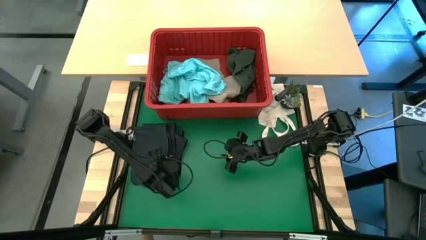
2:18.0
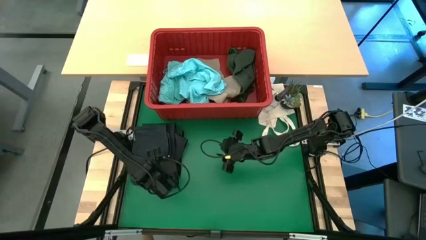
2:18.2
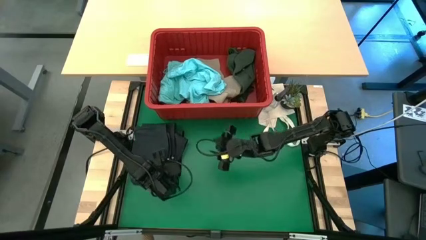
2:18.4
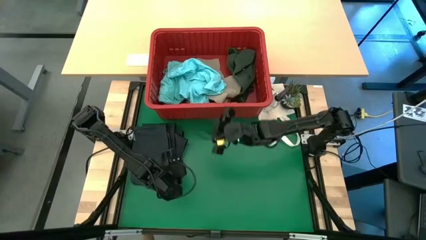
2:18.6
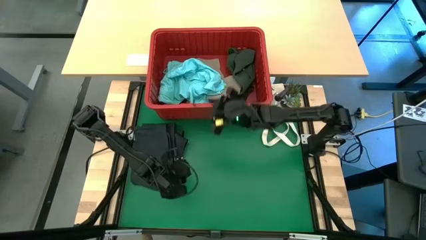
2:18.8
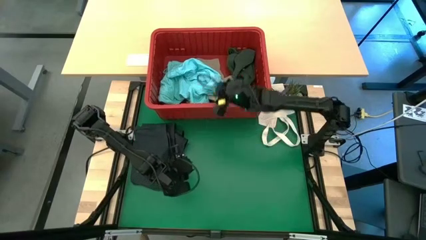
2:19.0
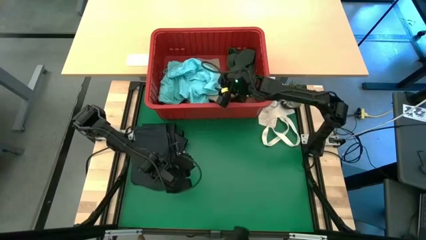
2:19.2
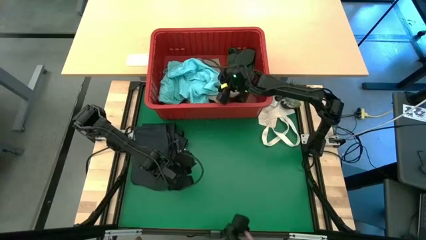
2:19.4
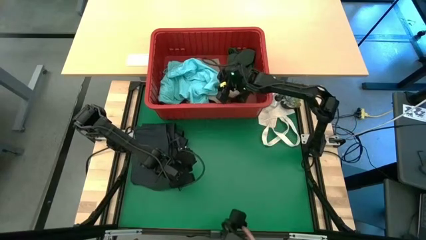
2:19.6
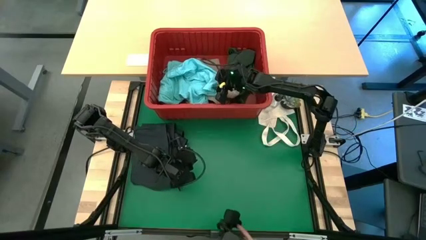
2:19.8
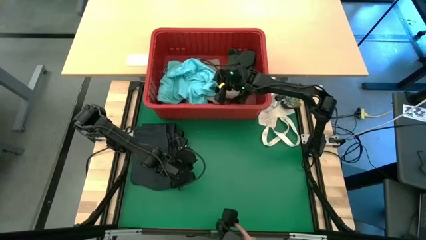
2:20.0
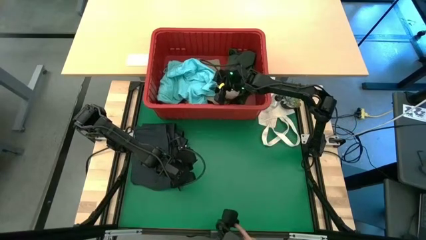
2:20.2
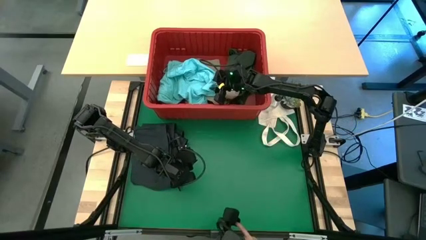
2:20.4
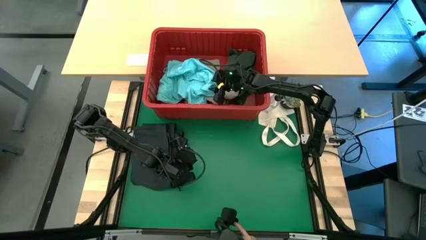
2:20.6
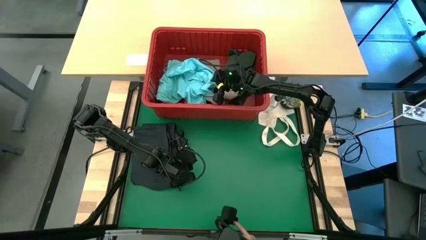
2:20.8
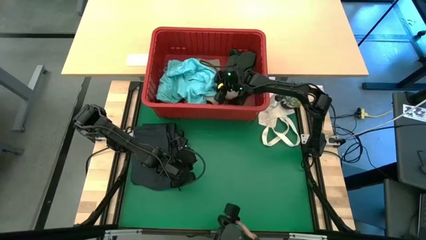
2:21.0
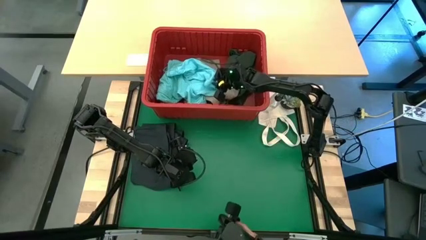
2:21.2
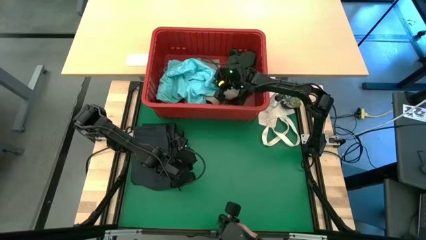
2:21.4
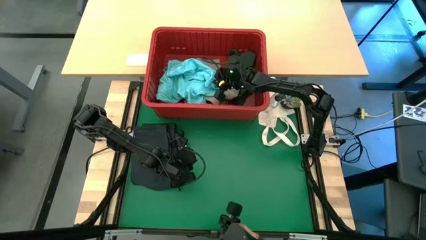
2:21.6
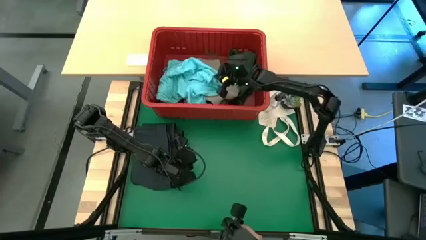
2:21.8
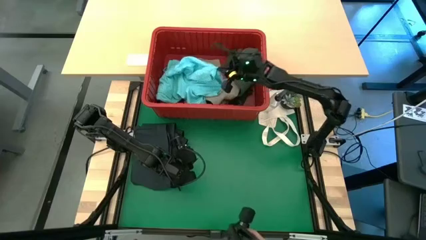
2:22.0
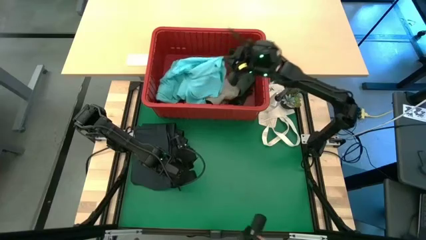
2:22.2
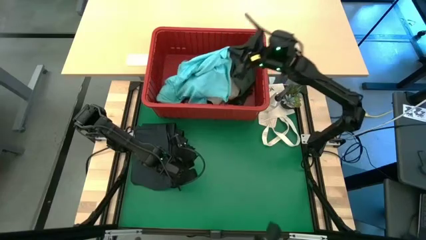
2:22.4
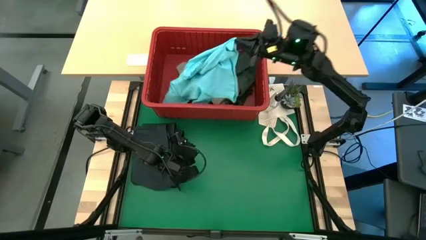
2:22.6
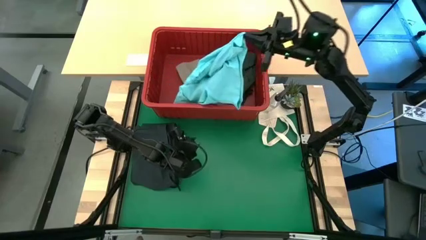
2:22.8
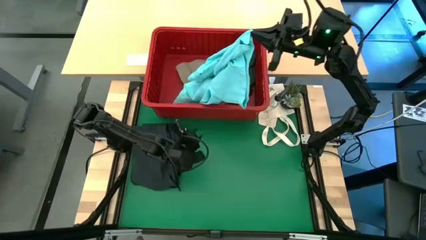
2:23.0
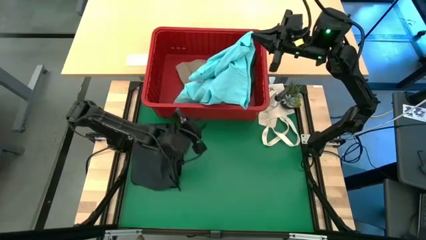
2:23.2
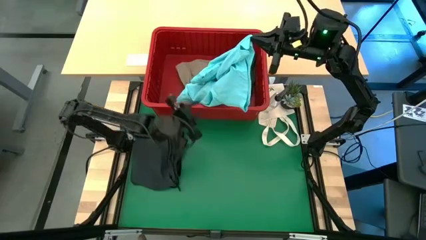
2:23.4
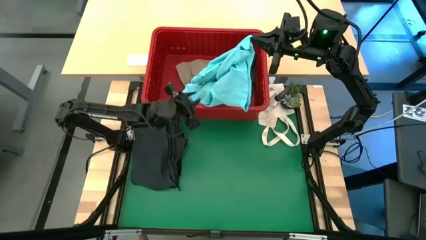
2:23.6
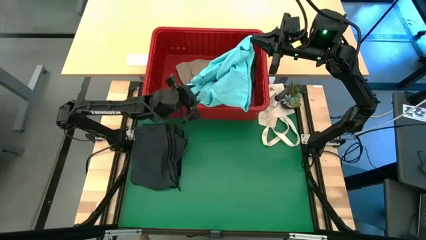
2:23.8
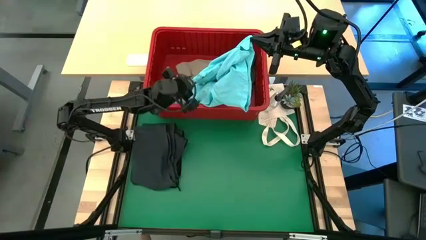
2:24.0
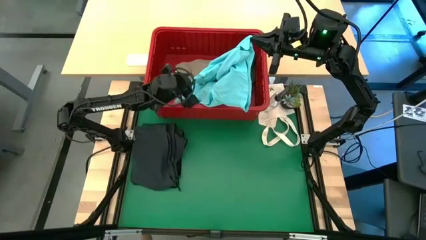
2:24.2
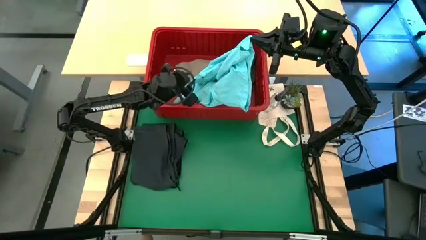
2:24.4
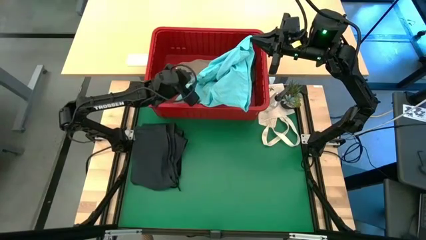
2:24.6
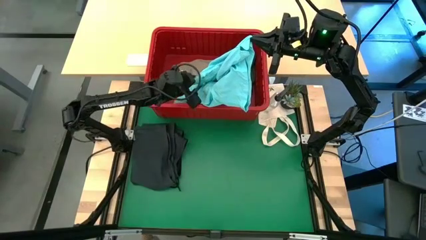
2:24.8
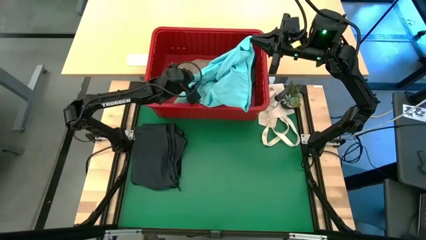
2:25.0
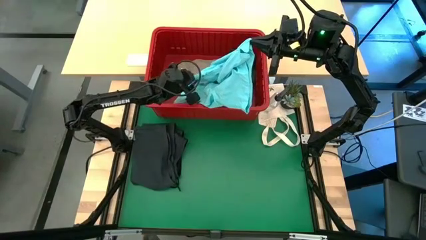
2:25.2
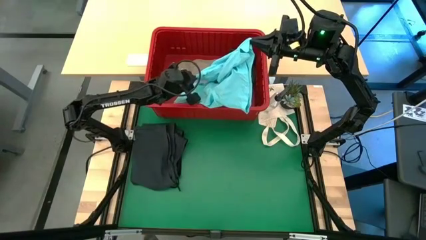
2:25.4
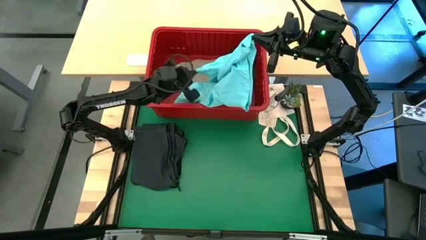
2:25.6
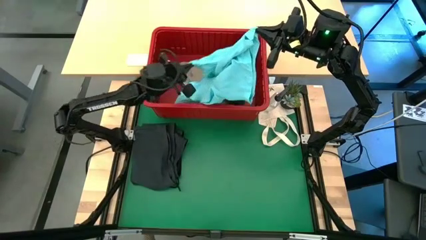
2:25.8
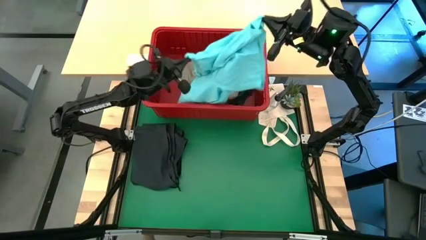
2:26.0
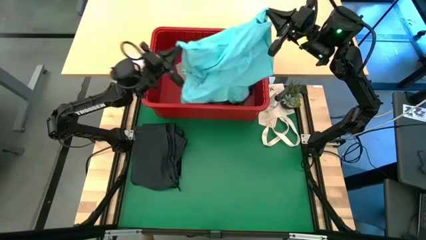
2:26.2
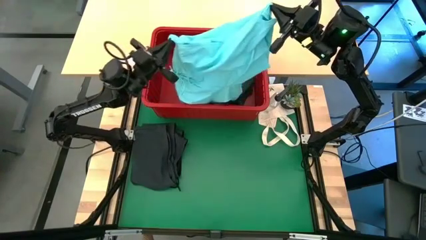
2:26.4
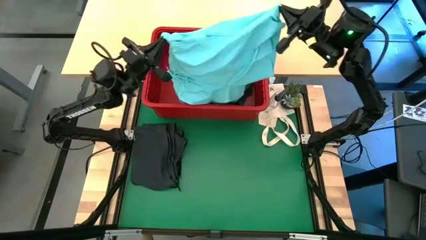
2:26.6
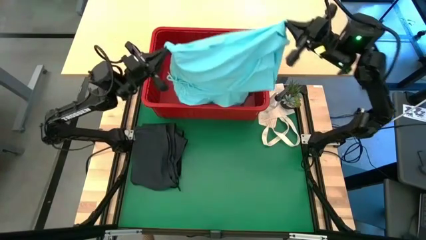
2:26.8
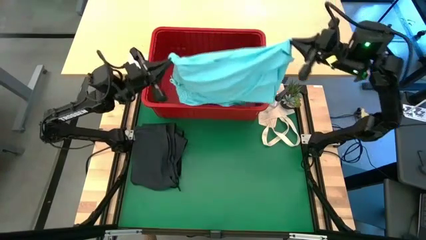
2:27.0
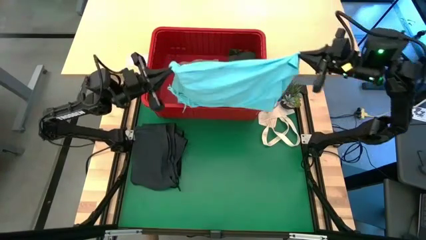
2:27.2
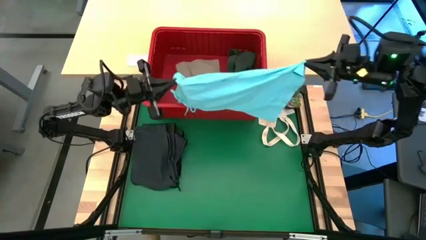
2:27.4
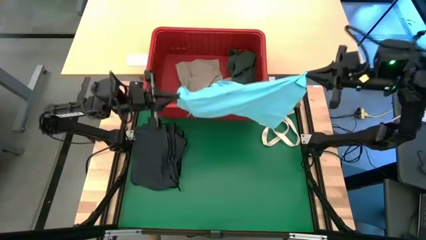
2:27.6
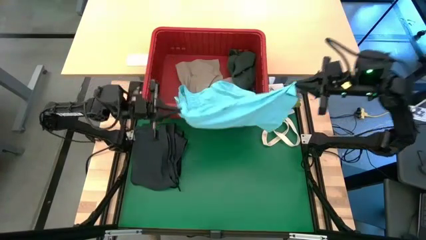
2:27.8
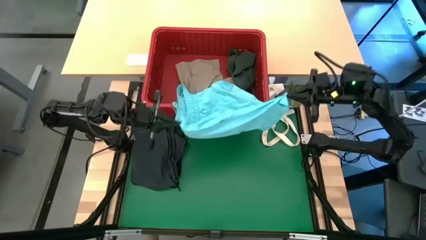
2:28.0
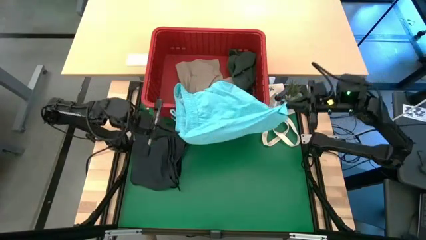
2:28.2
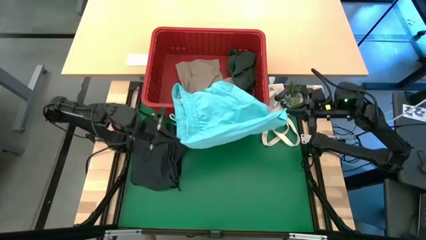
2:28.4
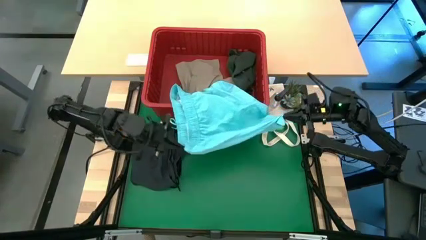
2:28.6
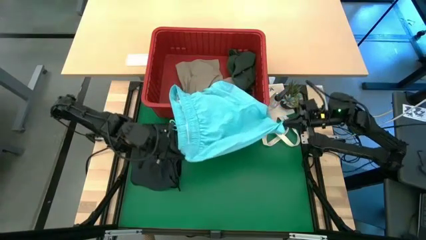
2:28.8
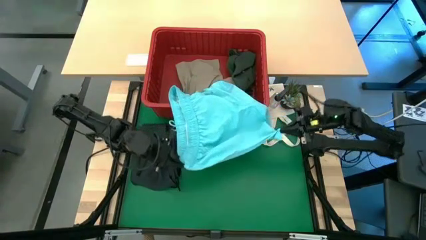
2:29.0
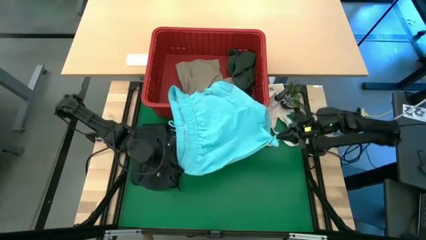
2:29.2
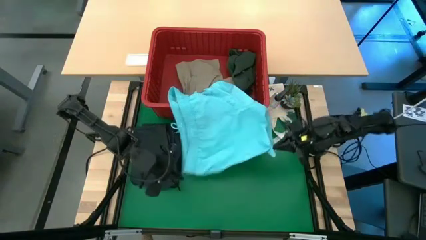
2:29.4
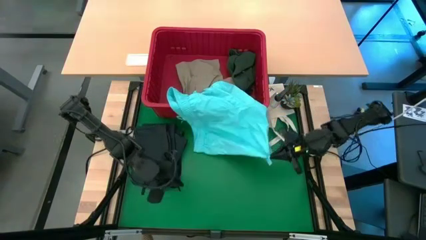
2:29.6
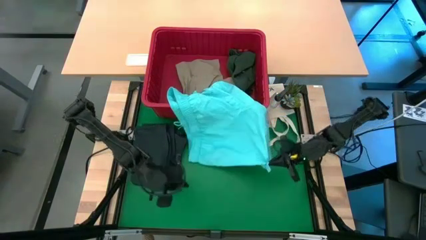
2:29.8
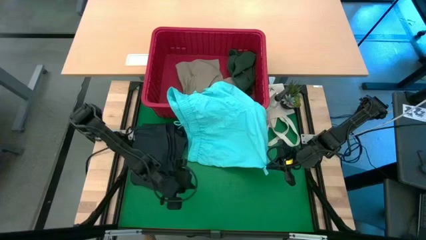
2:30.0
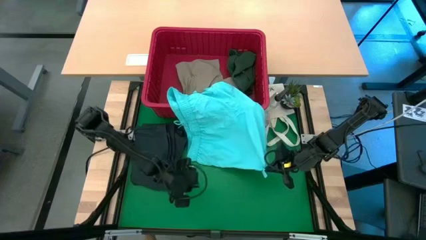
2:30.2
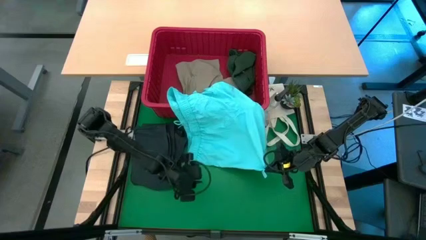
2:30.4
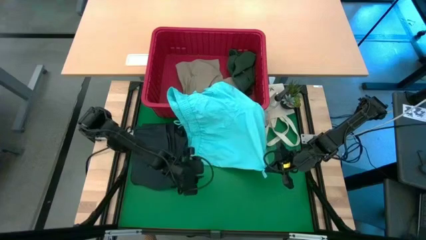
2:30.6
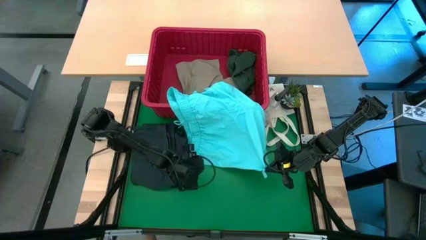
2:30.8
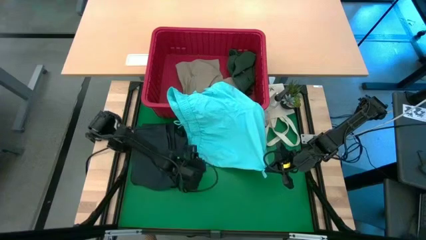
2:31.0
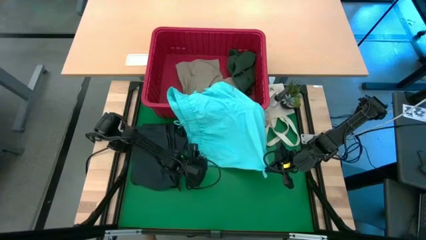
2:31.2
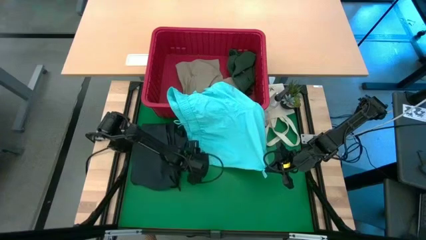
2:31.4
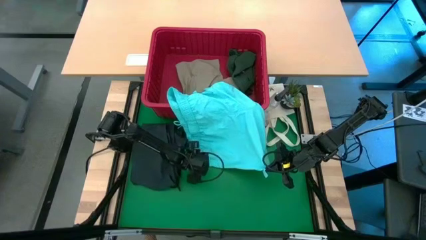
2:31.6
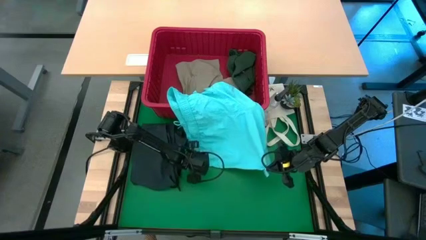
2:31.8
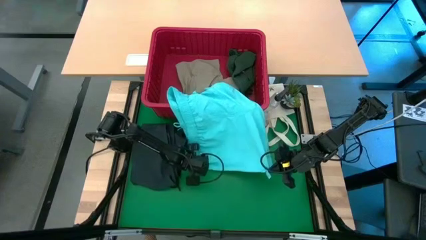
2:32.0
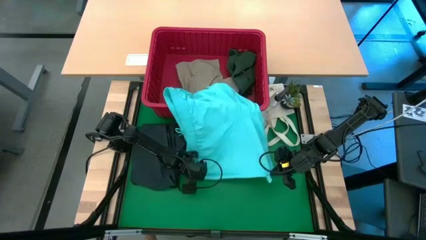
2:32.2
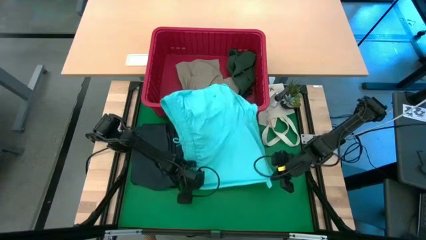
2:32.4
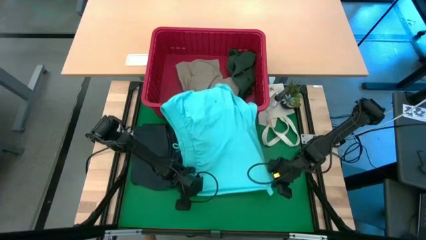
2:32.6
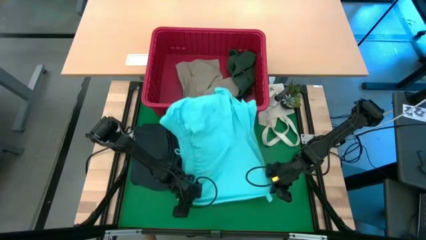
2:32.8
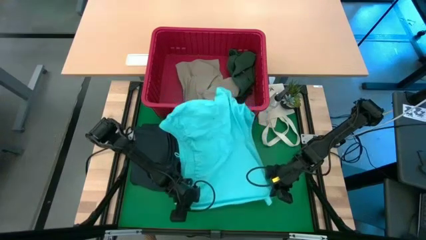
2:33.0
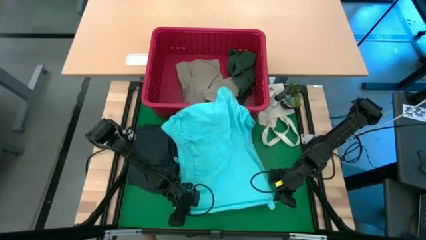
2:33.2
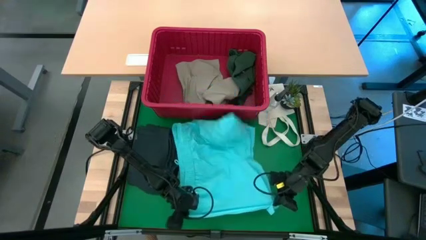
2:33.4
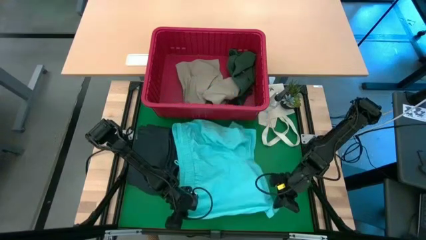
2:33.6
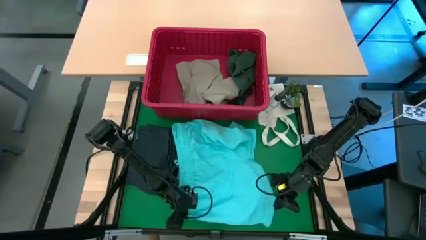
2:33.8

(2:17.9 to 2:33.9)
Task: Fold Laundry from Bin
Fold the blue shorts from the red laundry bin

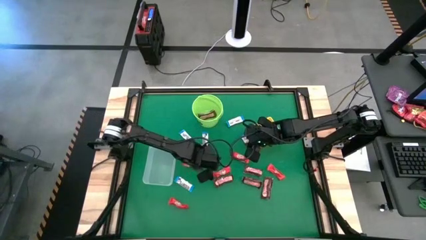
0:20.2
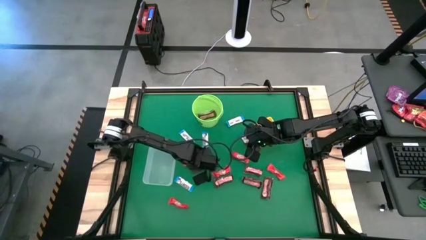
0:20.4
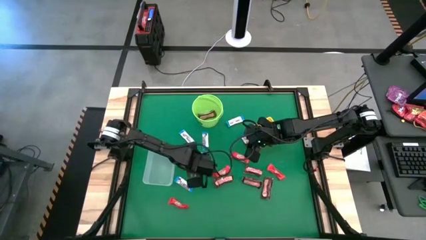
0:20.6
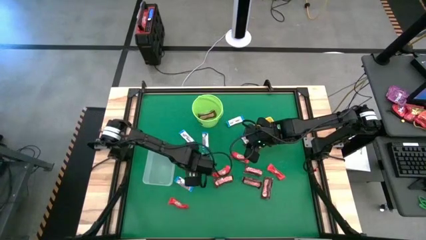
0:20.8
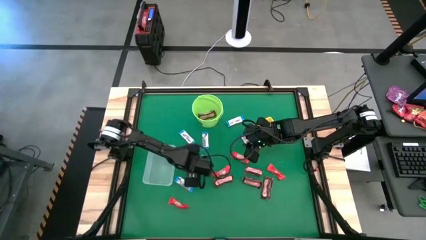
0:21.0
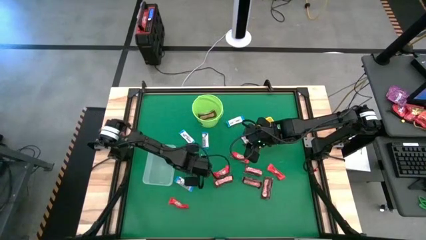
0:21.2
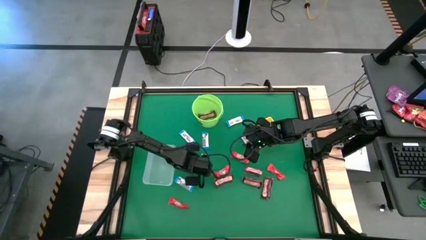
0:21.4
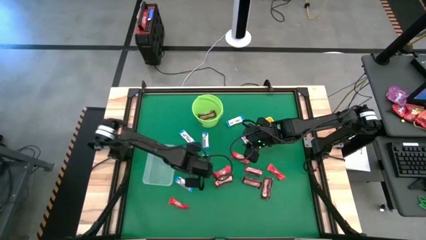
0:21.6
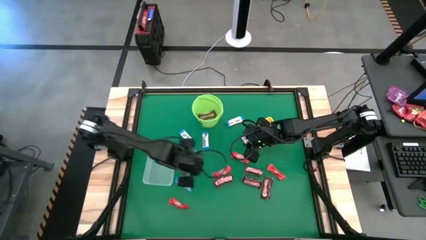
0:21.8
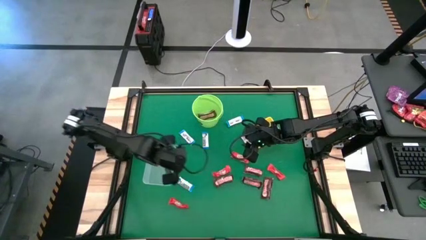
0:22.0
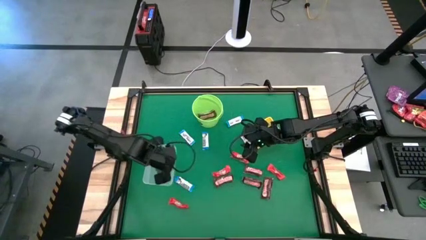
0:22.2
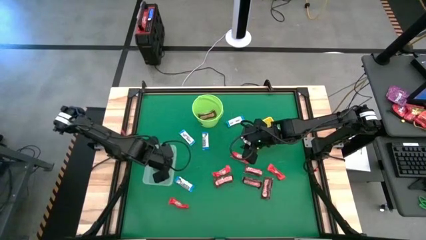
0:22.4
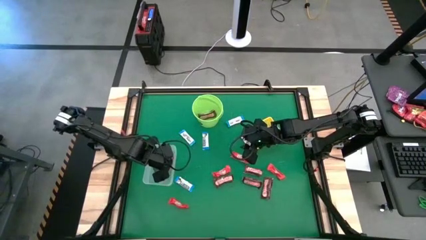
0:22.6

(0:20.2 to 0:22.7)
Task: Sort candy by brand, put in halloween buckets
Put the red chocolate bar into the transparent bin
